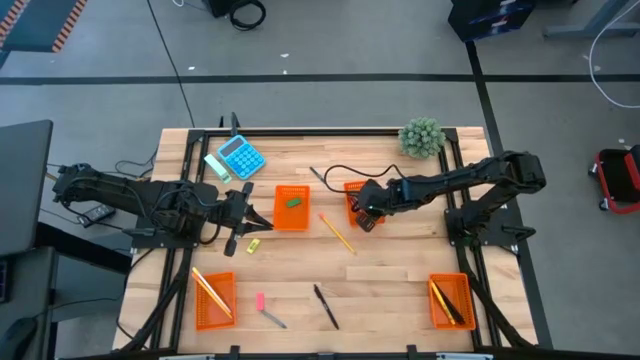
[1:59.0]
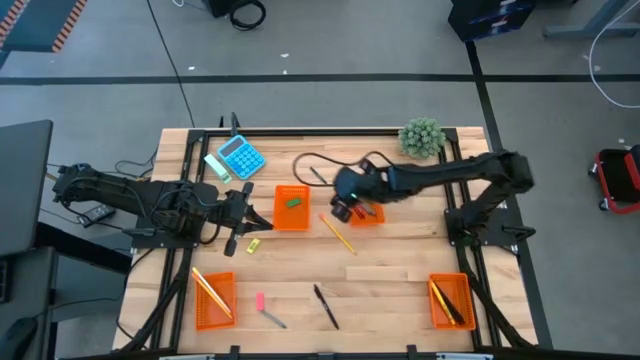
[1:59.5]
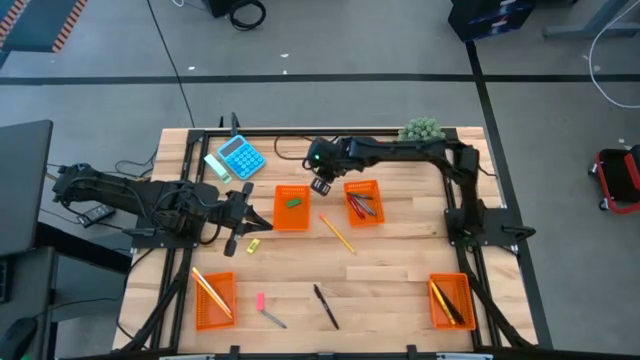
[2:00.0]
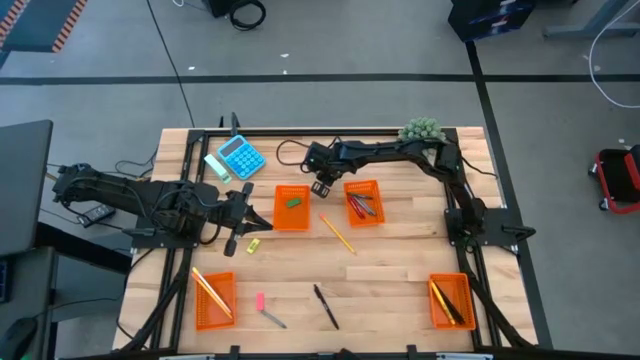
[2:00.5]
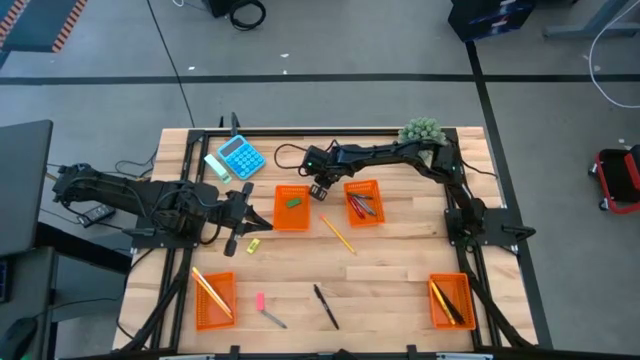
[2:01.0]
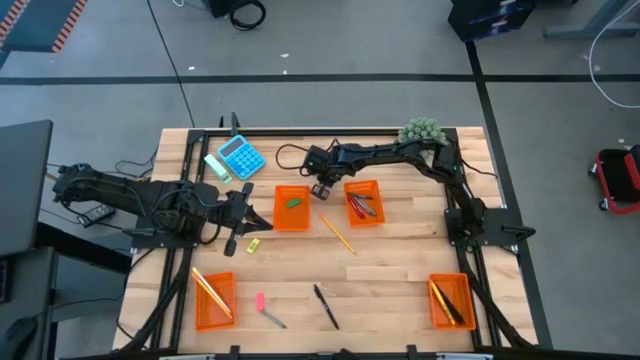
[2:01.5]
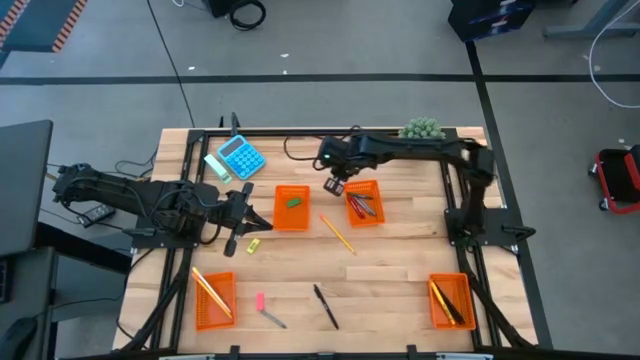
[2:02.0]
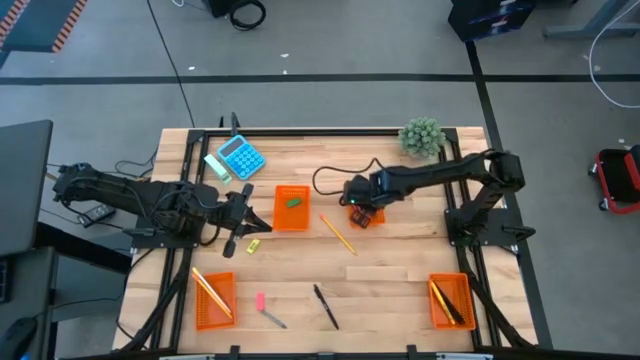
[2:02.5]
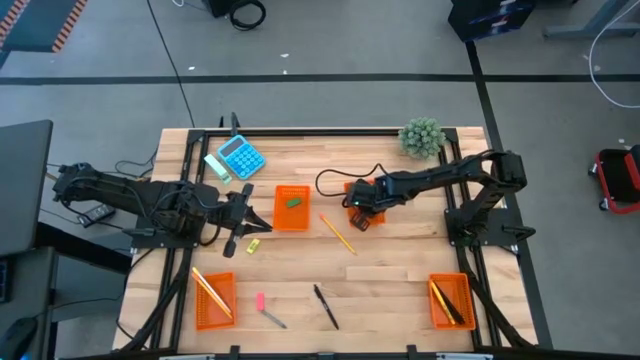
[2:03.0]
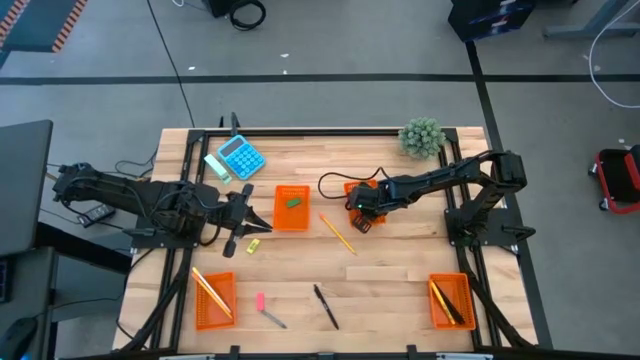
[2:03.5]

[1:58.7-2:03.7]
Task: Sort crayons/erasers/pens/pencils in bins
Put the green crayon into the top right orange bin

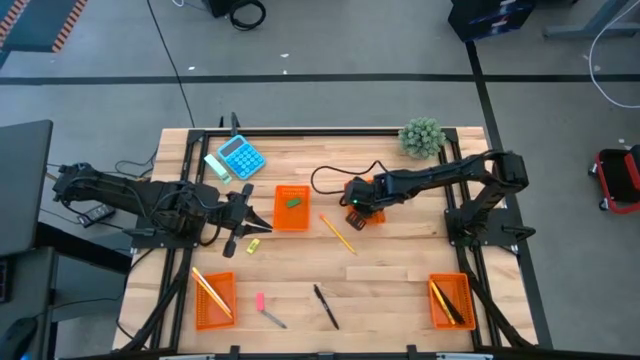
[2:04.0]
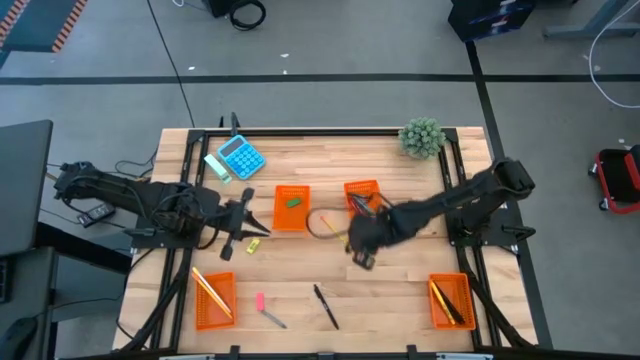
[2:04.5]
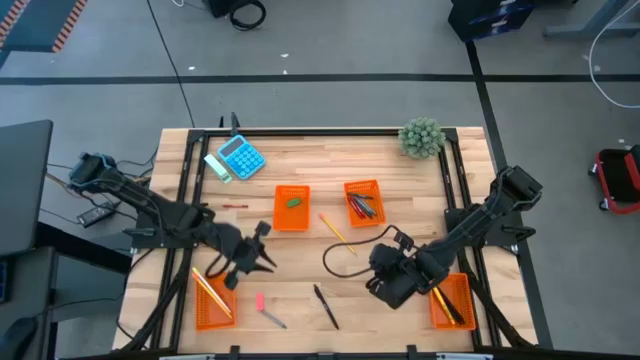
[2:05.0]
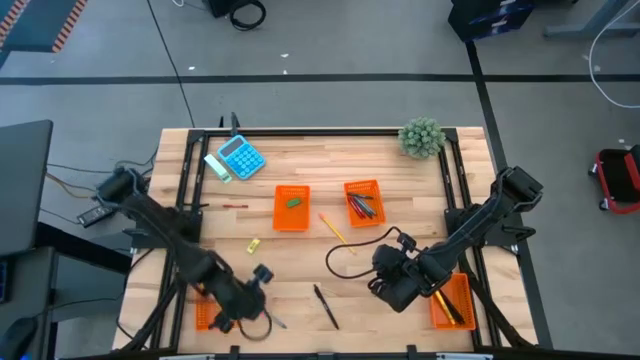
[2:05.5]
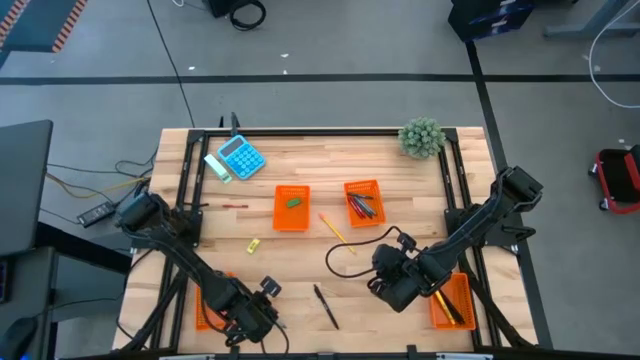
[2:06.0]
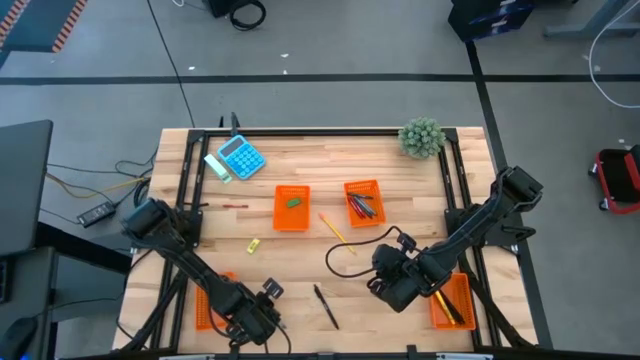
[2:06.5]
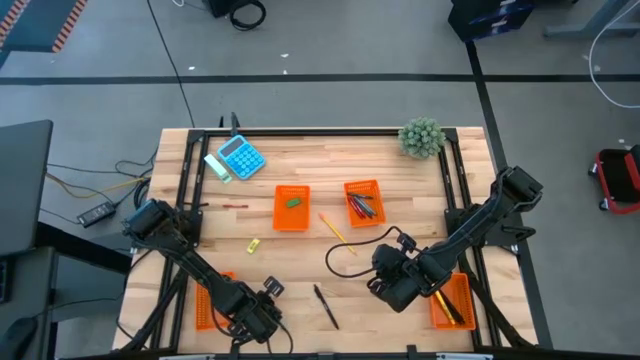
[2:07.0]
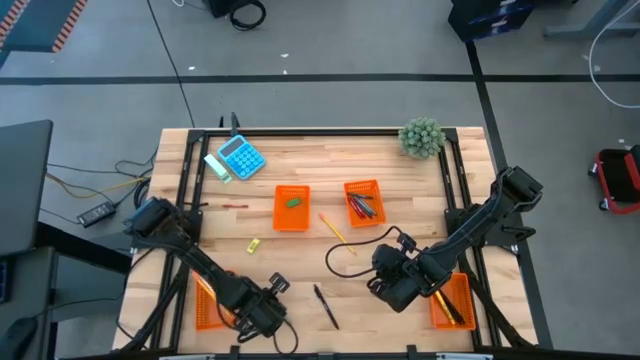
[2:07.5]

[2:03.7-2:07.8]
Put the gray crayon into the top right orange bin

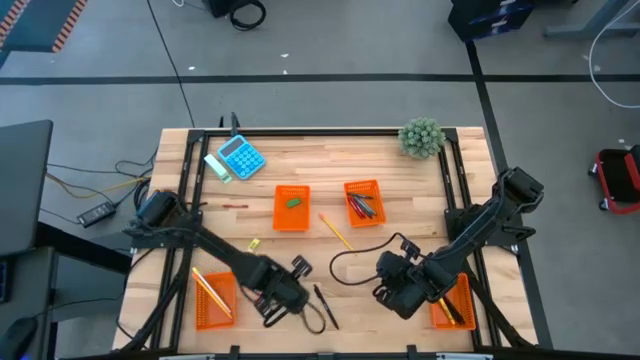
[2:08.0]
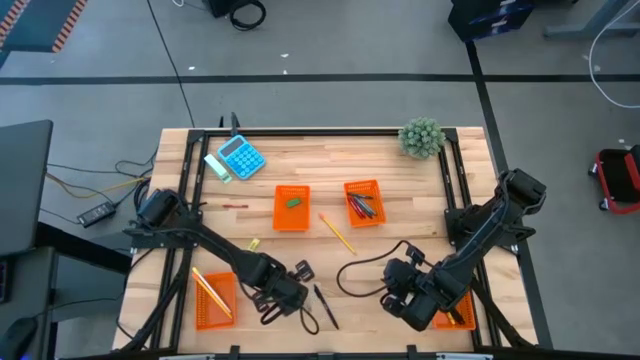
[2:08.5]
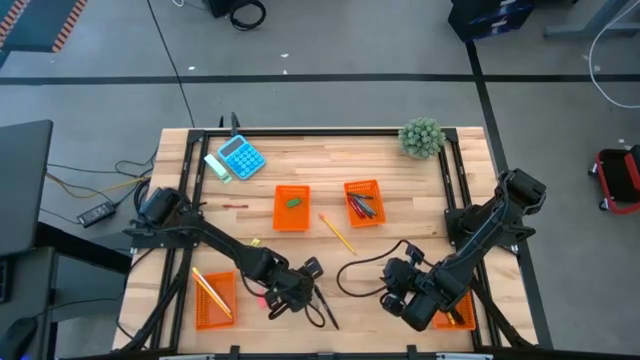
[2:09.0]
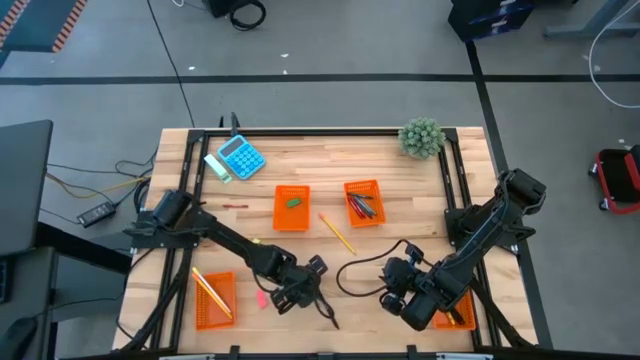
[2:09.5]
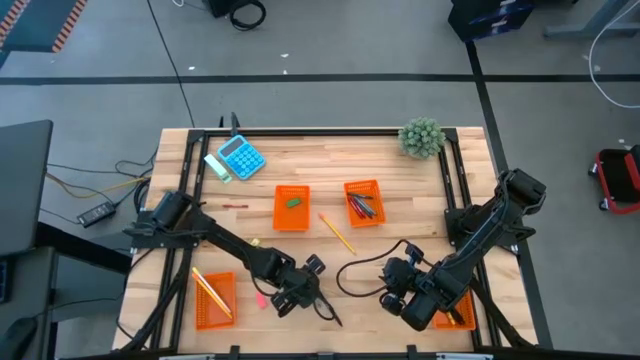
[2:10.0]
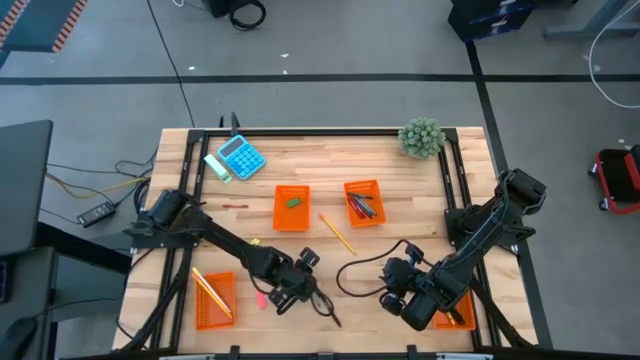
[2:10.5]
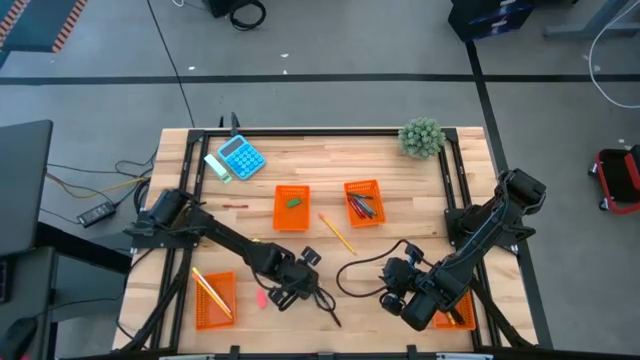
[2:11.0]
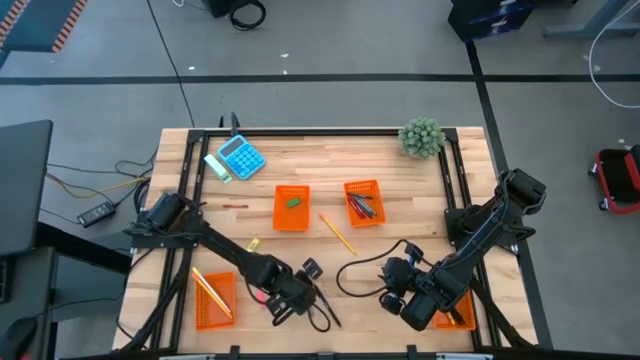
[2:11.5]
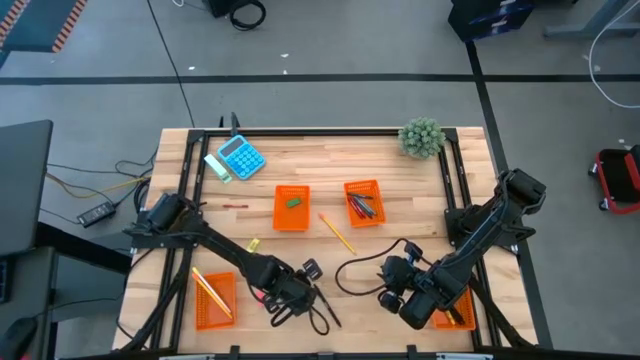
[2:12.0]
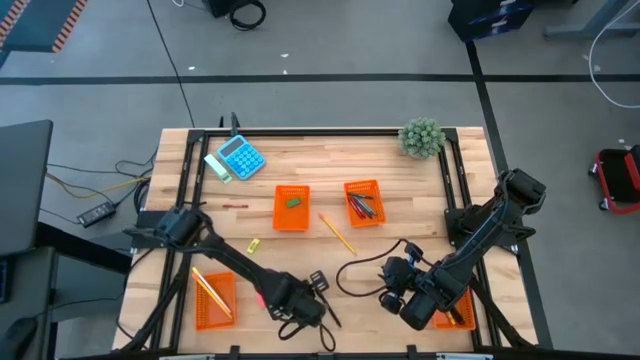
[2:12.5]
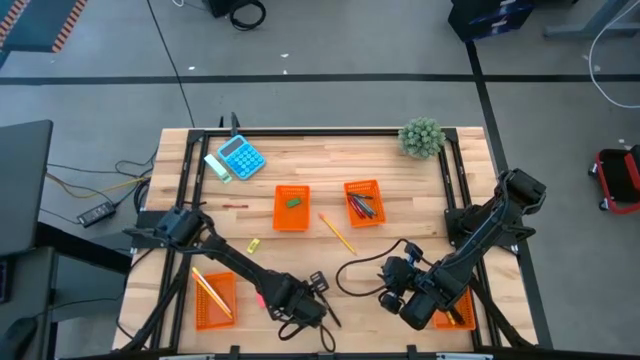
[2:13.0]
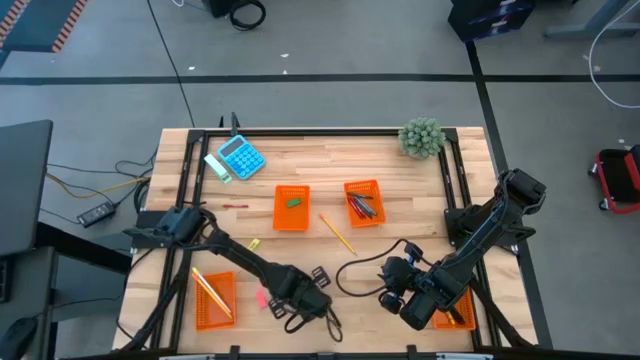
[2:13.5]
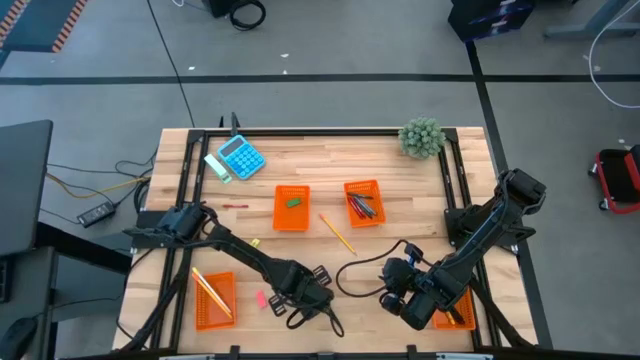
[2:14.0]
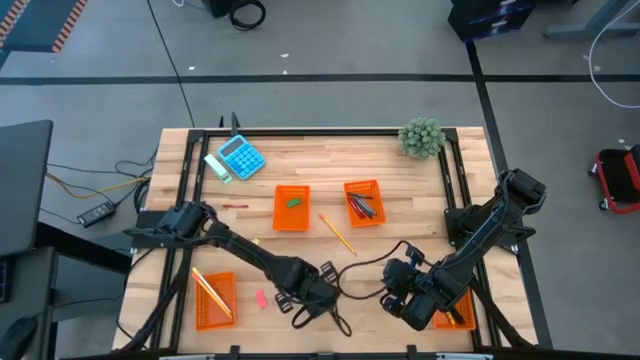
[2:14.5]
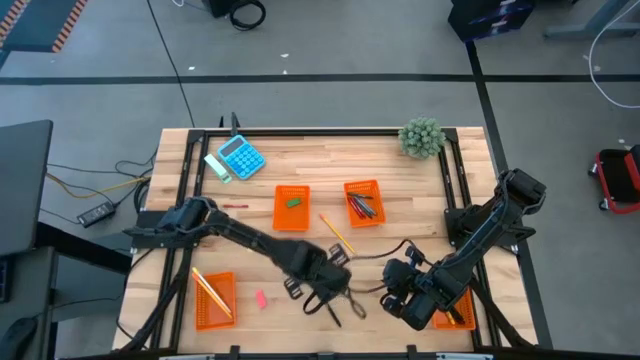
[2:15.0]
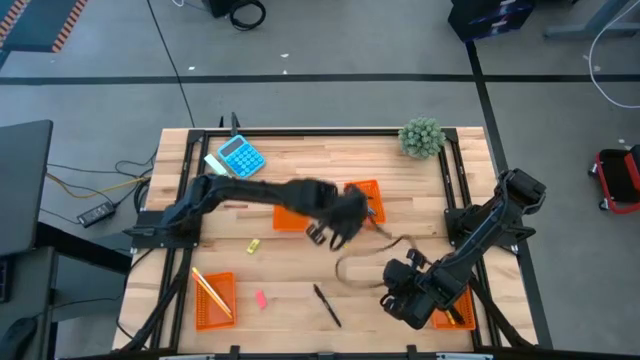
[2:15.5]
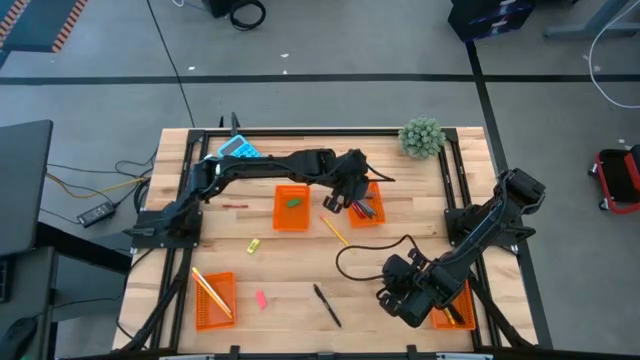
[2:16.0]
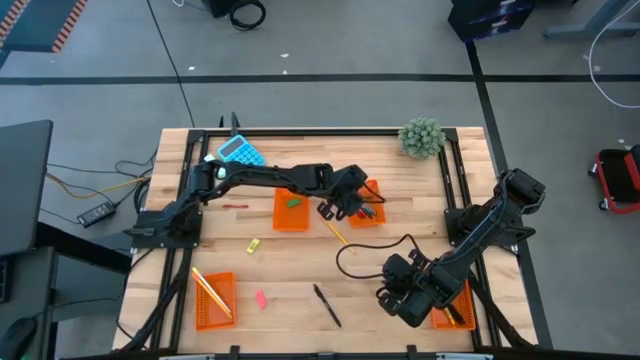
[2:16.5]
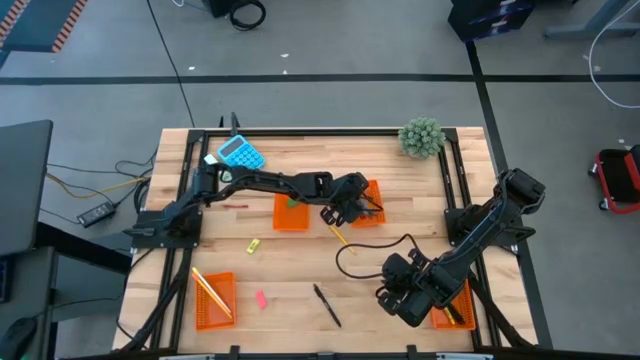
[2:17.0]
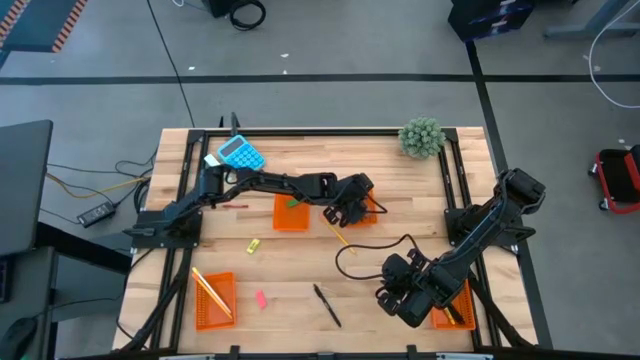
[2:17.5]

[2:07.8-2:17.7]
Put the gray crayon into the top right orange bin

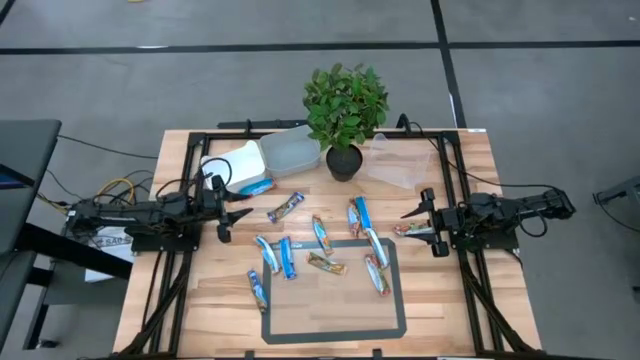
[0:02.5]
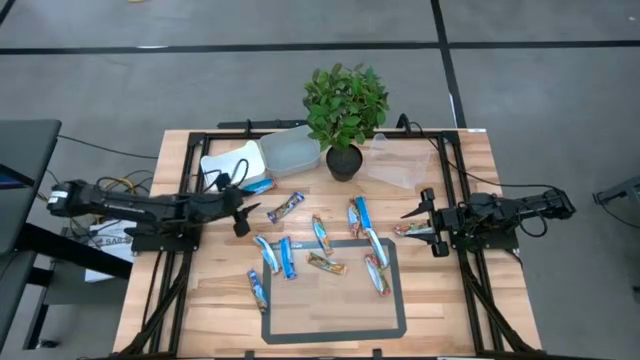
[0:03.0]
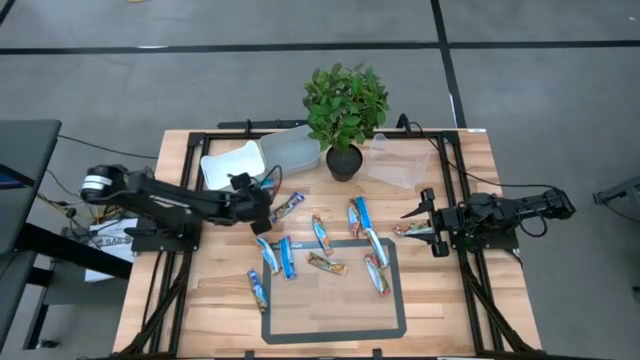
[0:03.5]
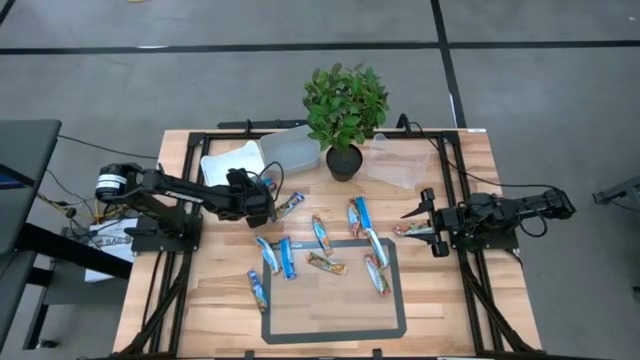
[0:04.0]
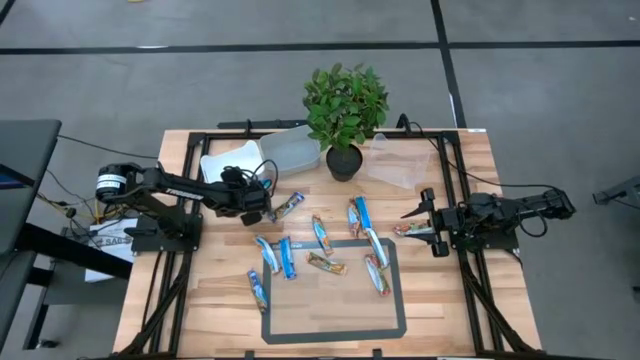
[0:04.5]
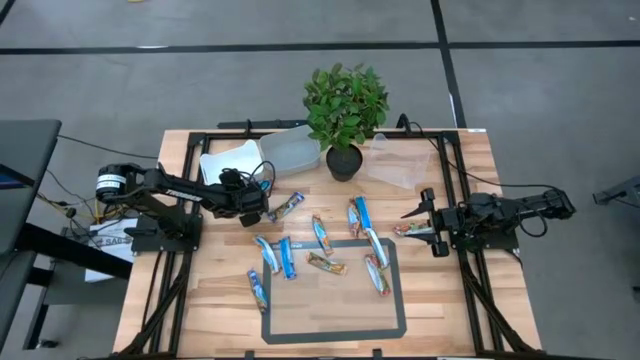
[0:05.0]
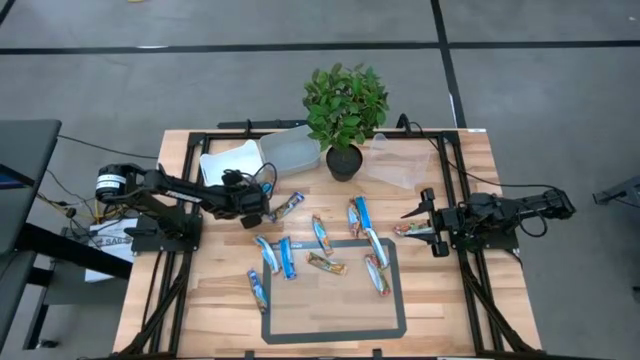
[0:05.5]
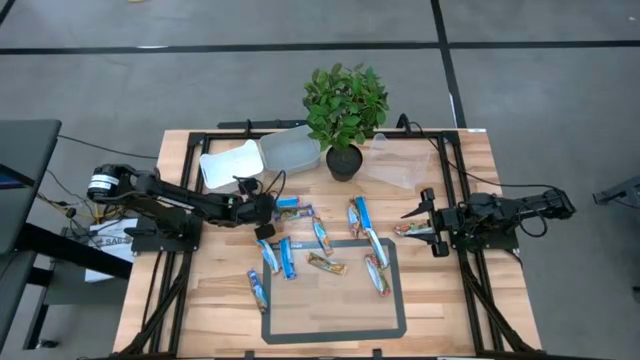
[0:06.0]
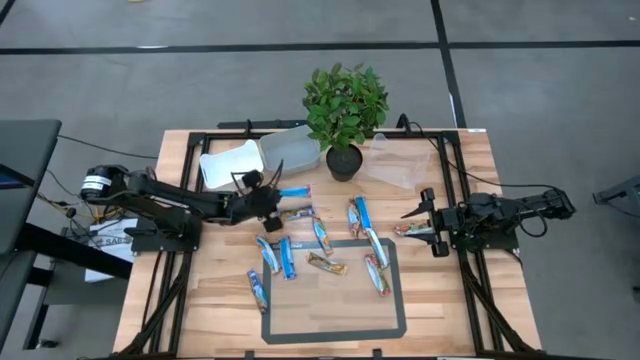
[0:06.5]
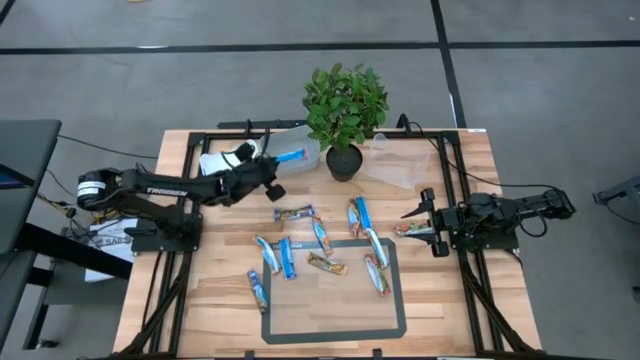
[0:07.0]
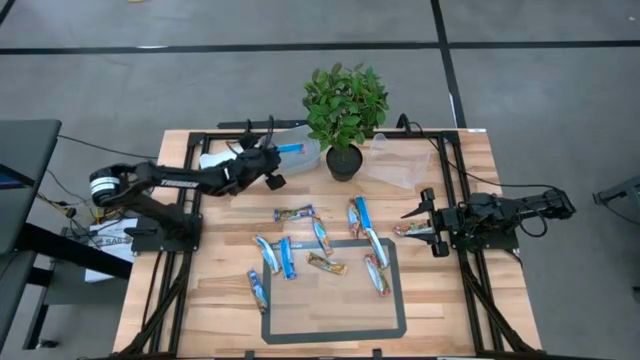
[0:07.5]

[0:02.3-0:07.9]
Task: Pick and place Granola Bars by type
Put the red granola bar into the gray bin
